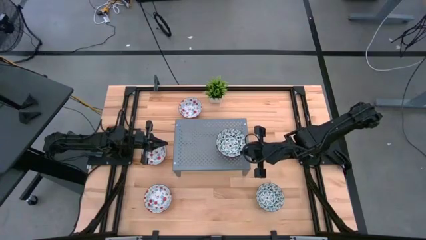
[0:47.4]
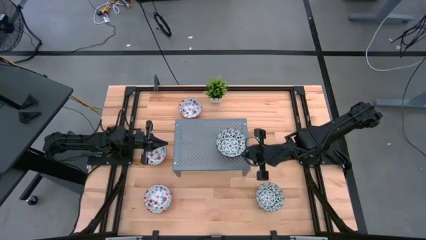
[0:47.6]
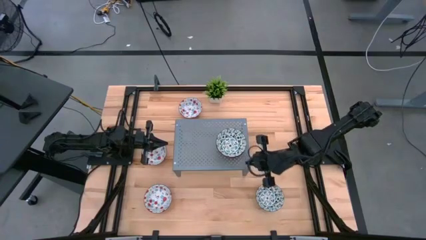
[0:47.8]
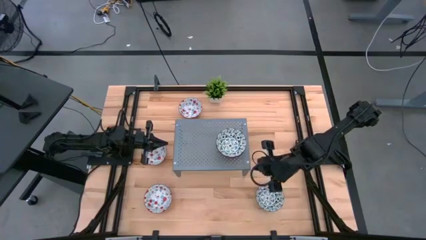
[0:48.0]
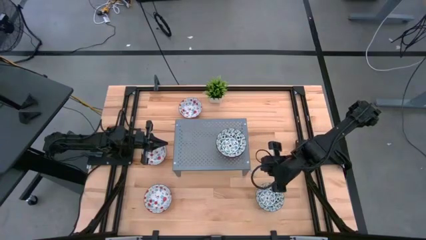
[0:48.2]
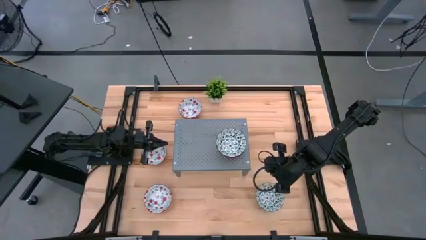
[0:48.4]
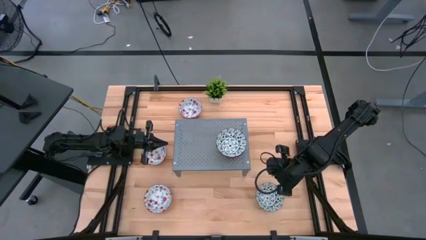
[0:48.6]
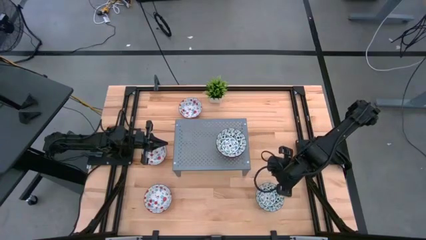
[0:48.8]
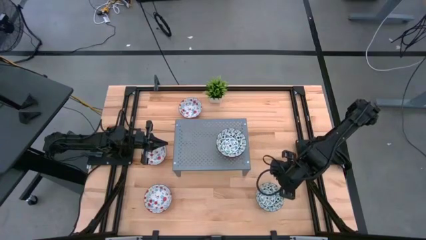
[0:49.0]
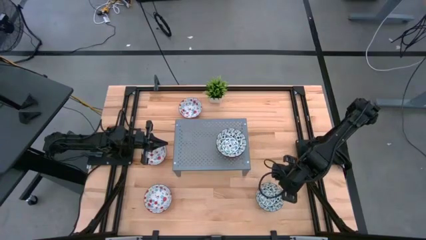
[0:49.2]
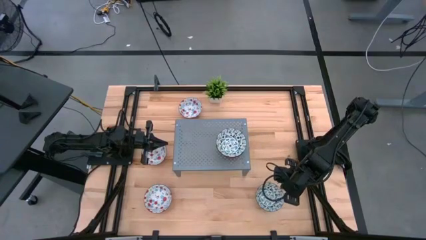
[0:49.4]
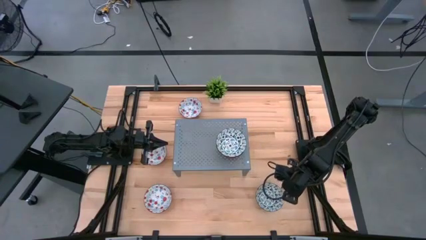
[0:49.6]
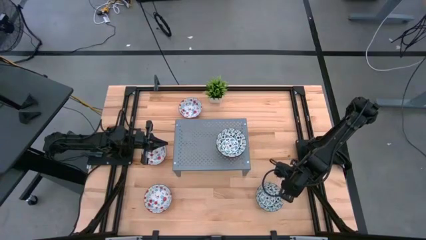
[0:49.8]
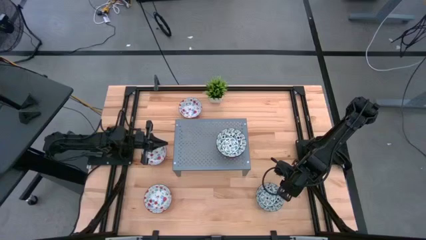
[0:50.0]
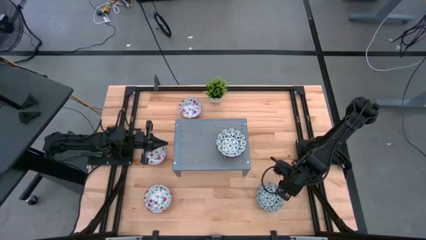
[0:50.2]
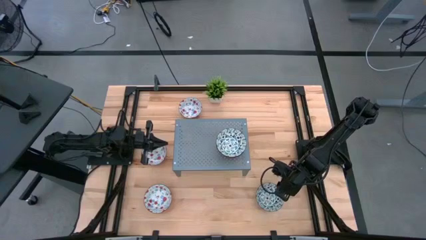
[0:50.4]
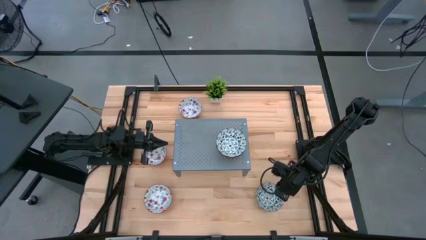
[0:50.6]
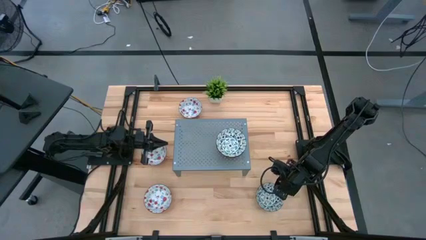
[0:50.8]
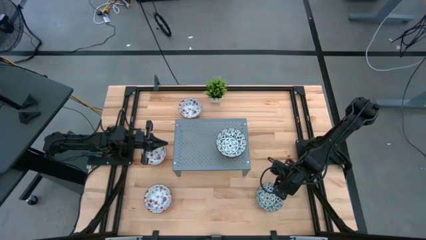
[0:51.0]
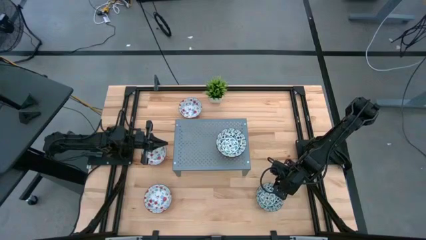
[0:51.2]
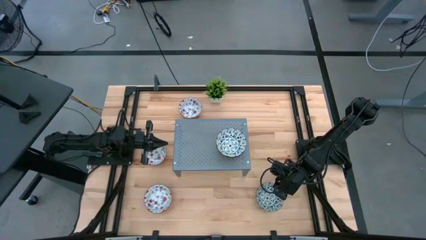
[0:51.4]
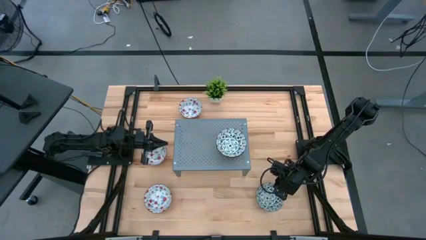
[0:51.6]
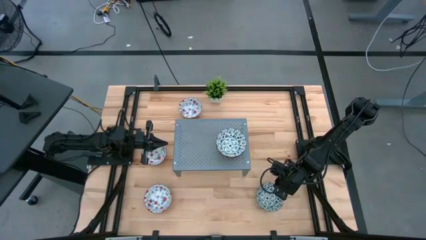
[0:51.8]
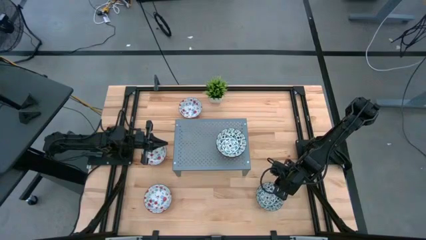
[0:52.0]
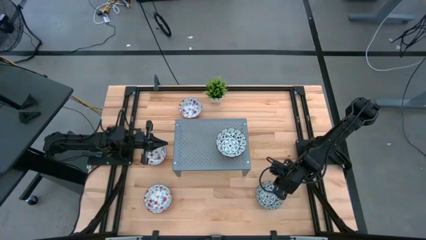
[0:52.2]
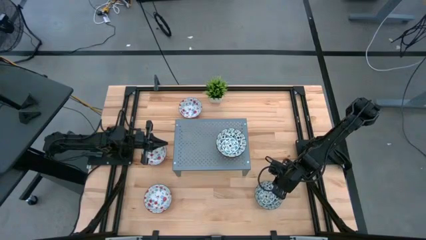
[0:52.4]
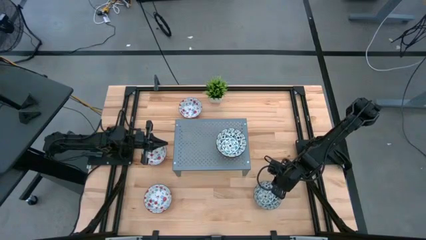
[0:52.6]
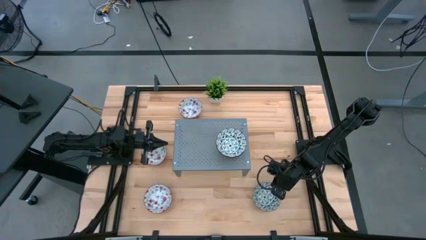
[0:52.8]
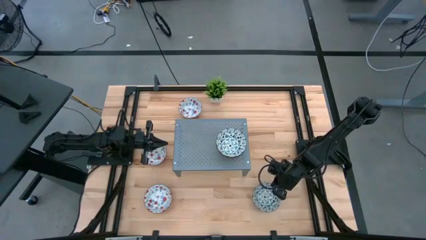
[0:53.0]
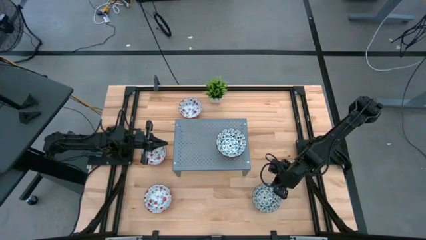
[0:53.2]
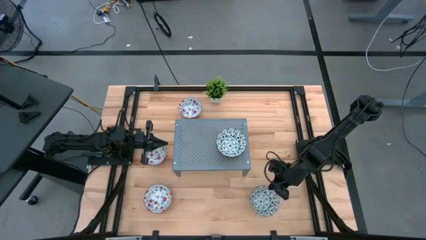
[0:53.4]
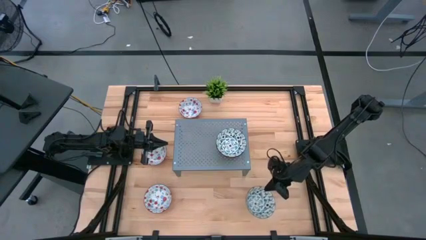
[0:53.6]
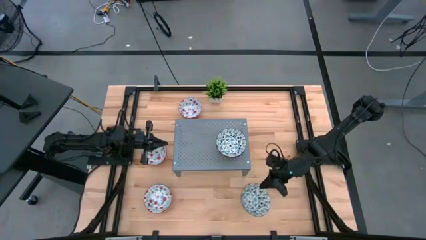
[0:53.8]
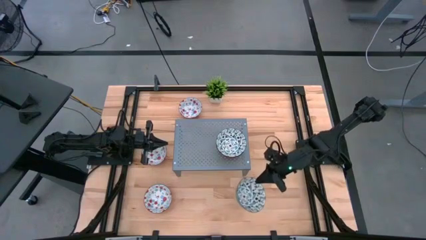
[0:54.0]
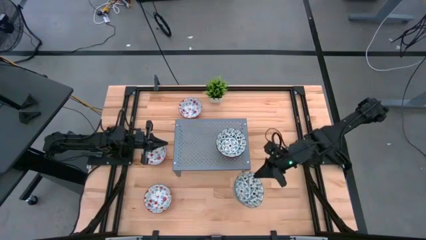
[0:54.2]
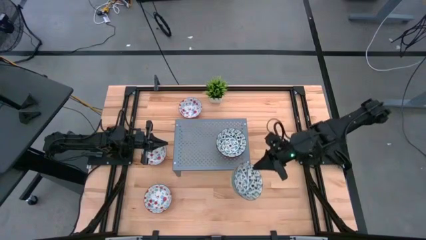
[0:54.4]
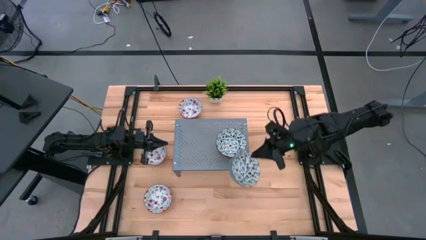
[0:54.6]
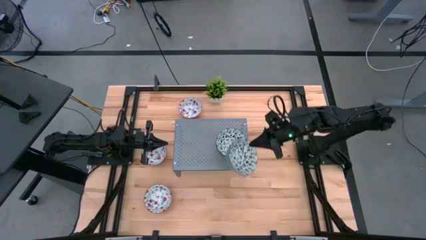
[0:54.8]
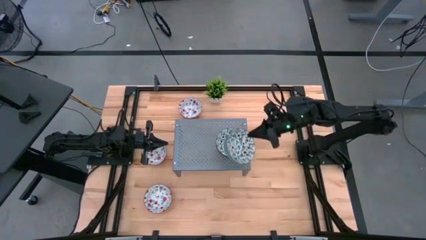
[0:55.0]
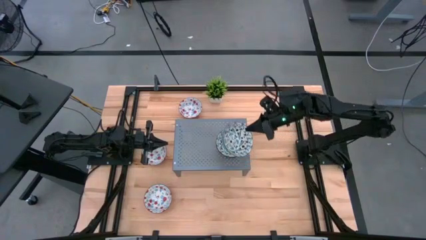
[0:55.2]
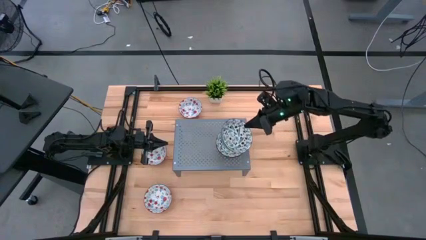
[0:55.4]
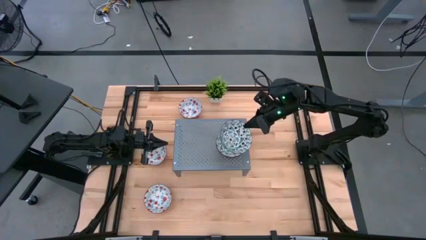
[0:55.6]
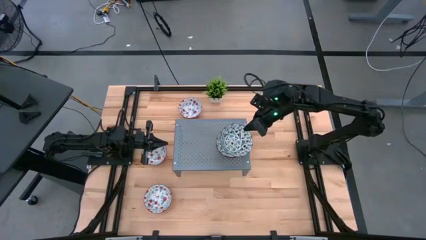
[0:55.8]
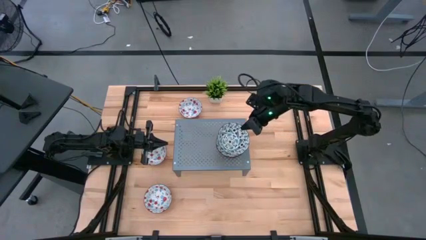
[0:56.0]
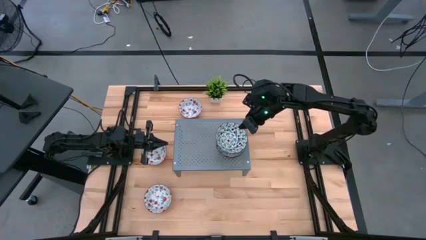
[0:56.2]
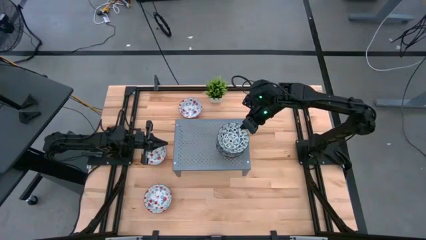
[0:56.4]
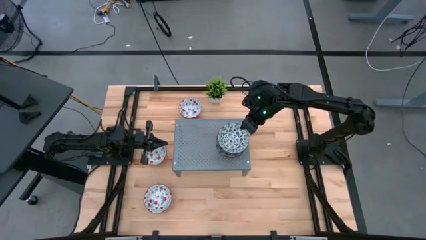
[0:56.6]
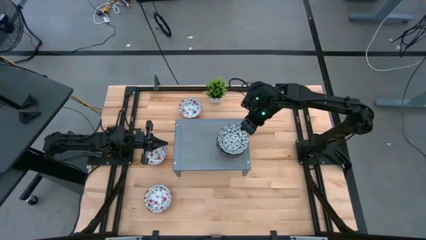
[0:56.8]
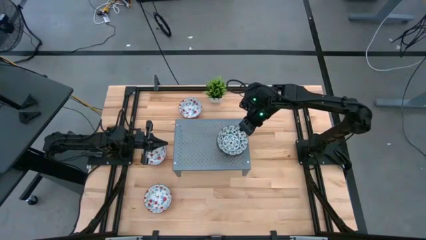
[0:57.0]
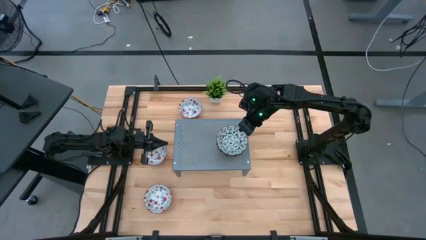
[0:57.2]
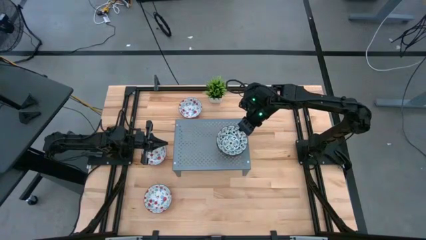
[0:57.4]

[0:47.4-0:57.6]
Task: Pick & Place Mini bowls
Stack the blue patterned bowl on the other blue patterned bowls on the shelf

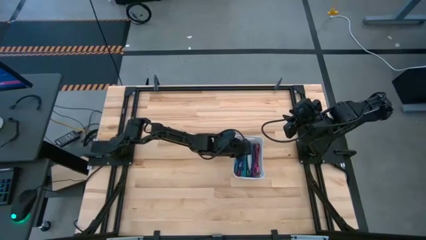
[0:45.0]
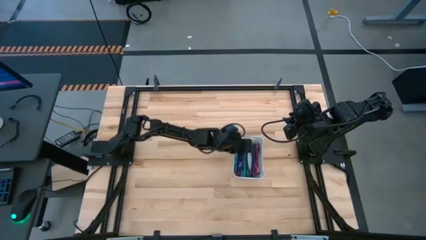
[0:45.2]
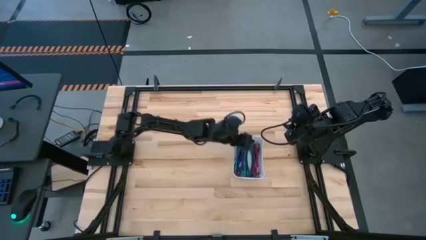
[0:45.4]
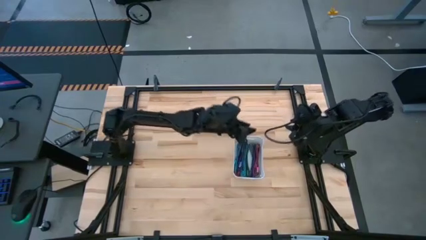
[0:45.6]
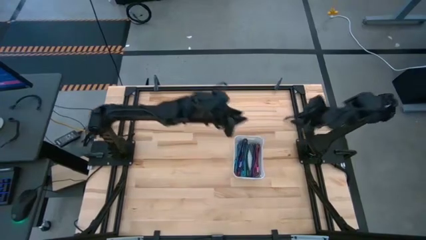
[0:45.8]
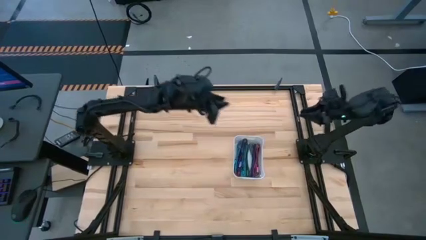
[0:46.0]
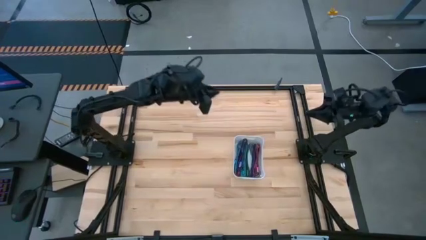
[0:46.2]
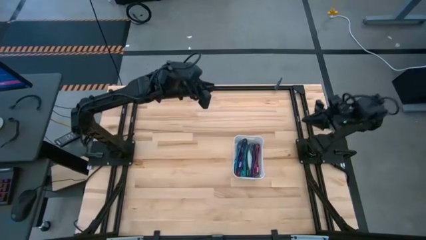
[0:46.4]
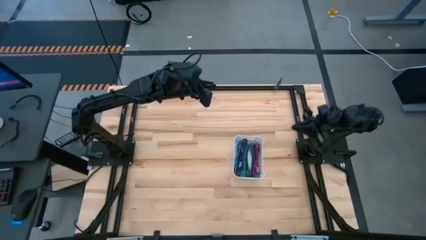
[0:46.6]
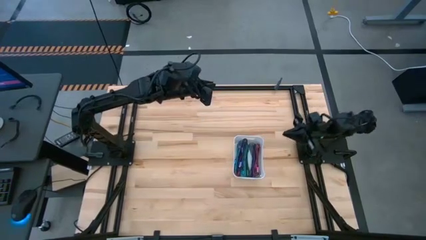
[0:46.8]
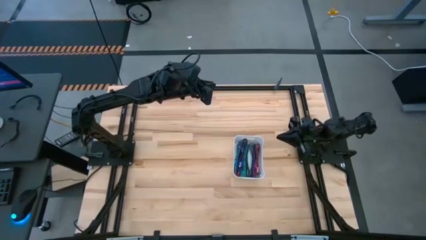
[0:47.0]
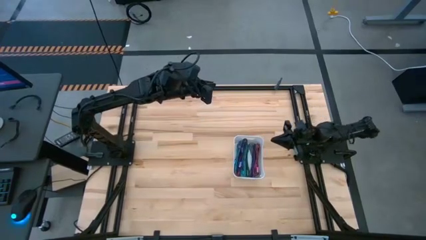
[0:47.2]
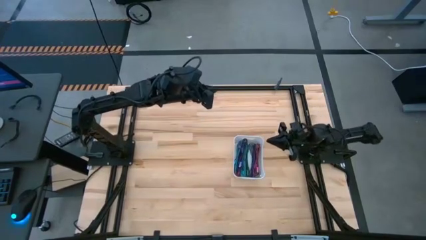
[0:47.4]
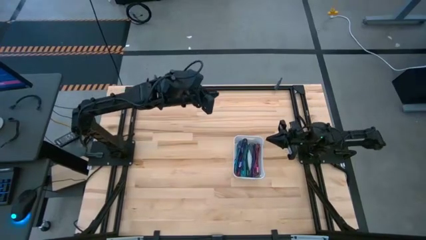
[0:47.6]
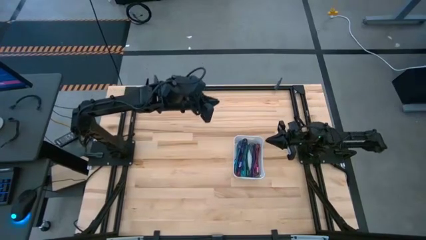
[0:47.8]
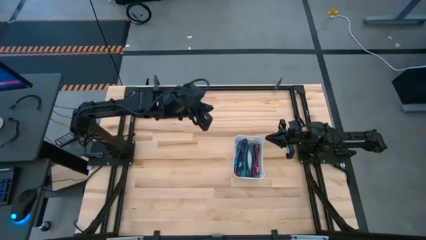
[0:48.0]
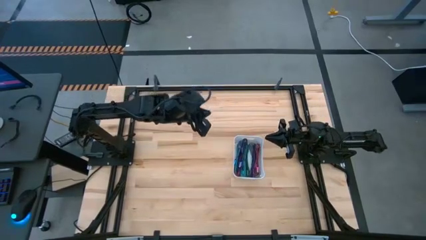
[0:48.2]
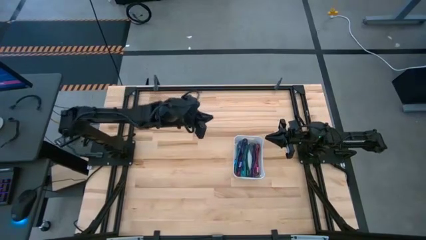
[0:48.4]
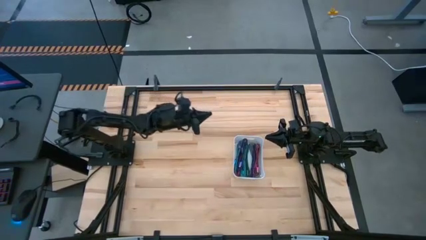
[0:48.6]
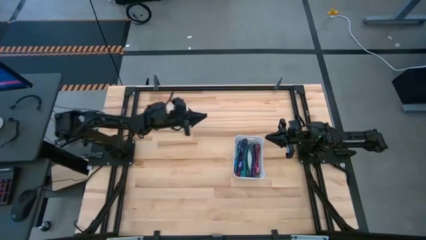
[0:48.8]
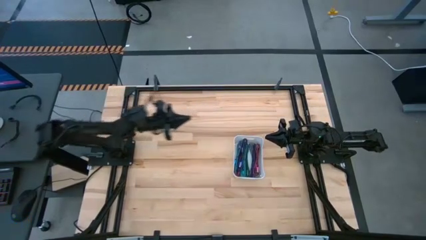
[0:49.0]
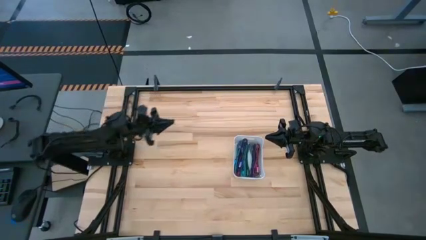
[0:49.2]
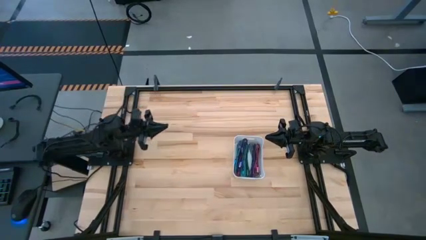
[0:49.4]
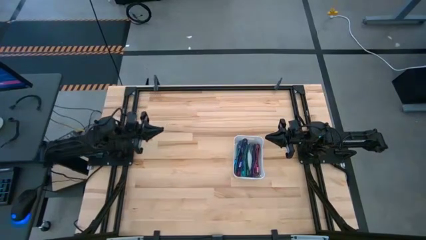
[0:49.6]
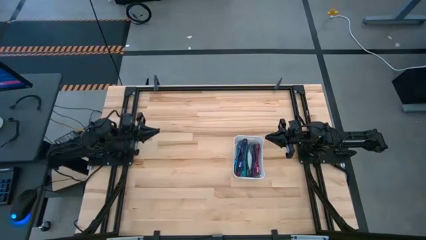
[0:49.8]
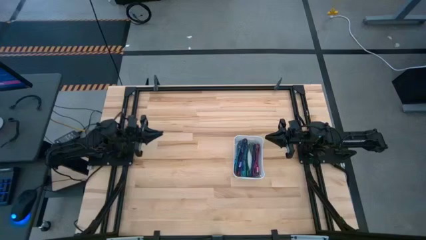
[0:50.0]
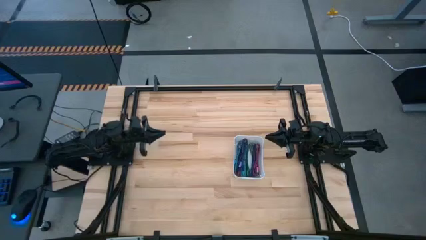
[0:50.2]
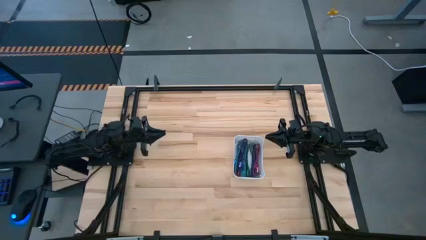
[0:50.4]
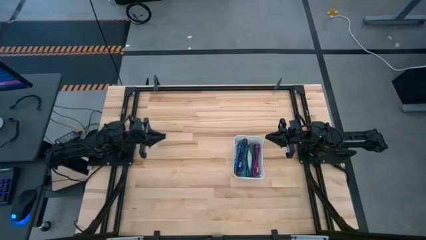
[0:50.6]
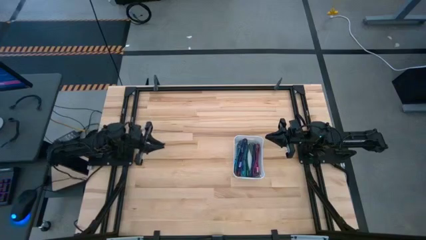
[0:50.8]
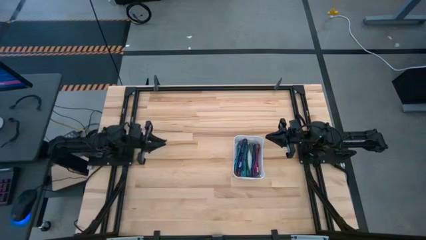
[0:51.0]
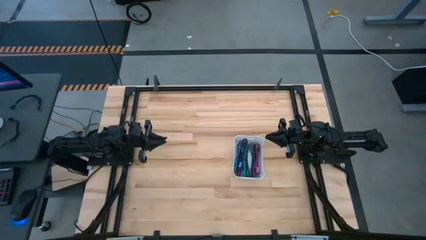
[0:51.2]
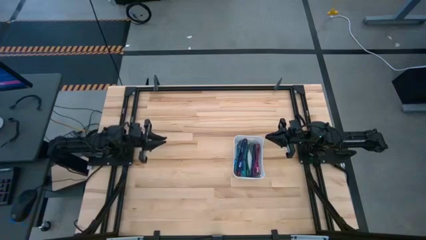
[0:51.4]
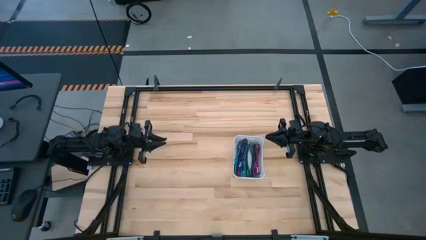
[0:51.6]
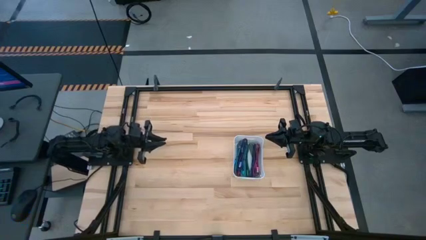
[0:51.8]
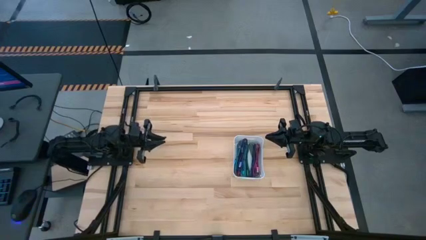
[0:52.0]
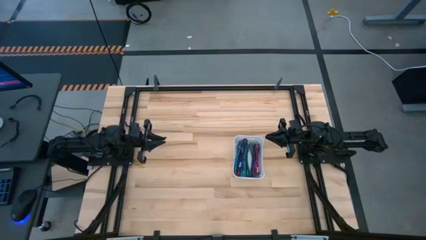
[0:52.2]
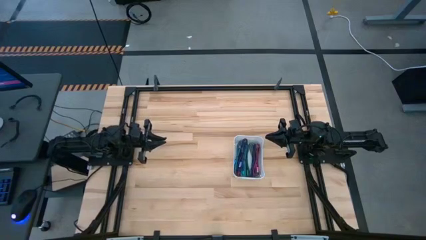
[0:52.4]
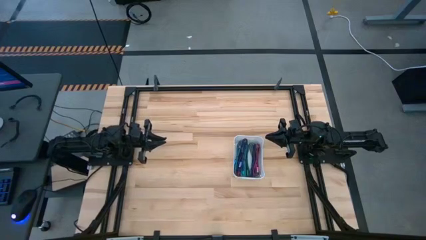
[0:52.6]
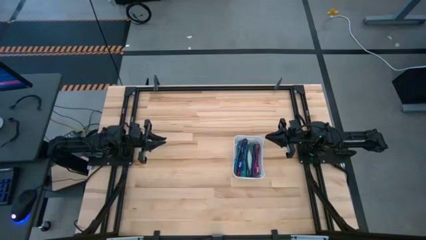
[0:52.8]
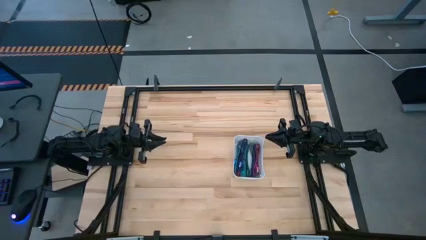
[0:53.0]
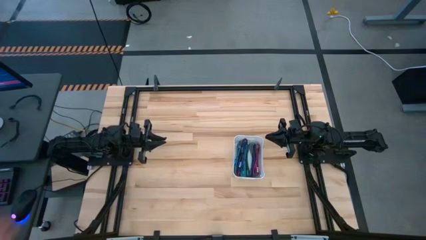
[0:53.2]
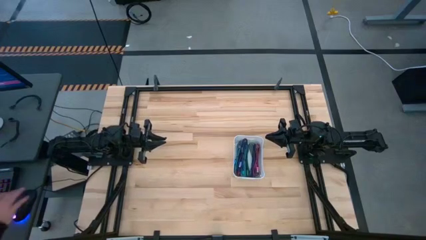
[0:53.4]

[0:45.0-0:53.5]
Task: Pick and place USB-C Cables
Return to Home Position
